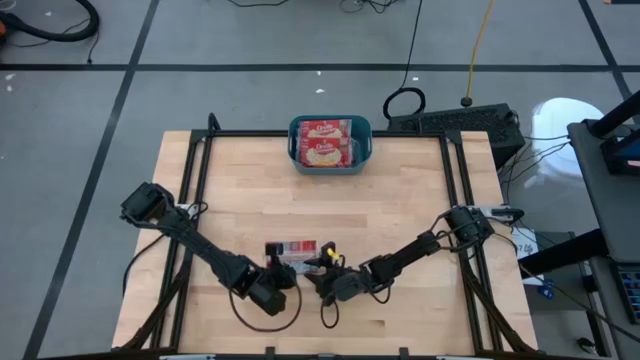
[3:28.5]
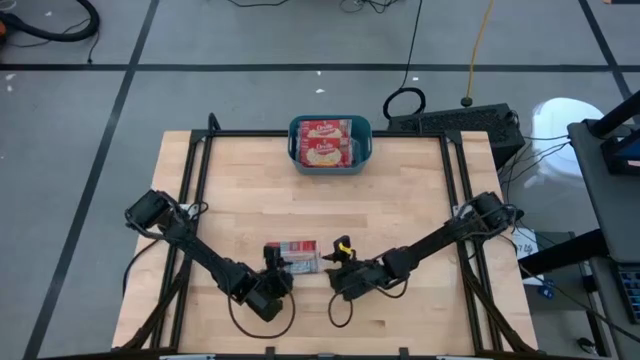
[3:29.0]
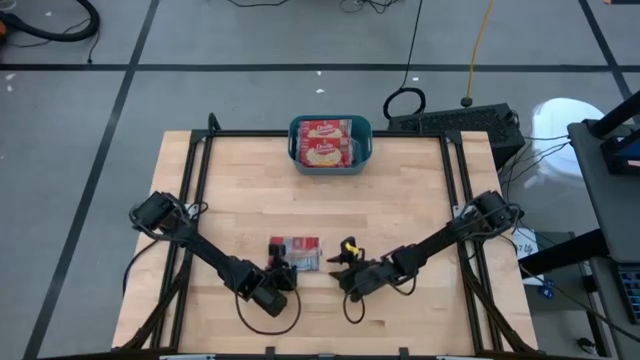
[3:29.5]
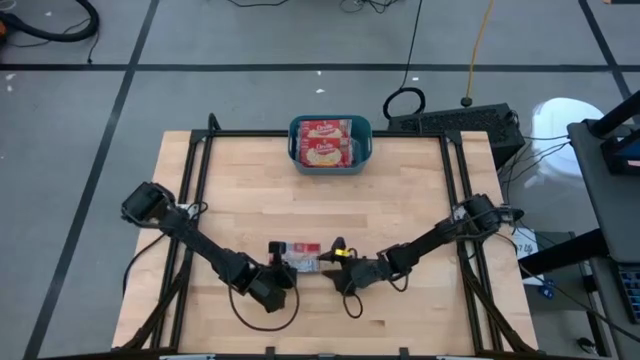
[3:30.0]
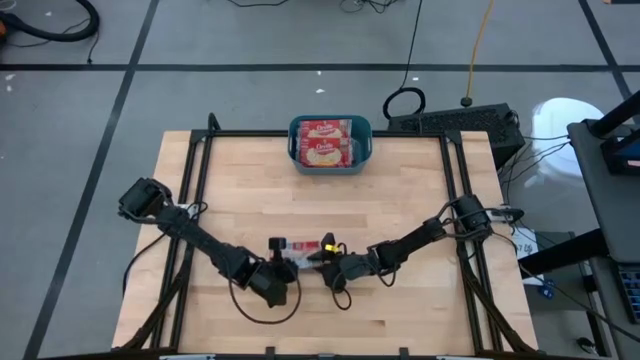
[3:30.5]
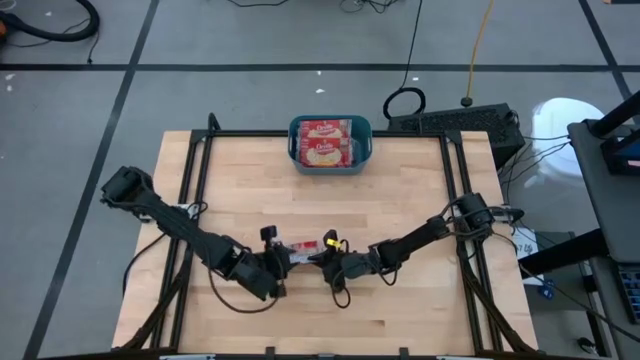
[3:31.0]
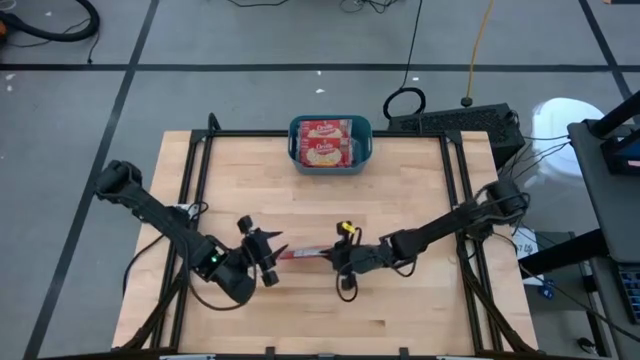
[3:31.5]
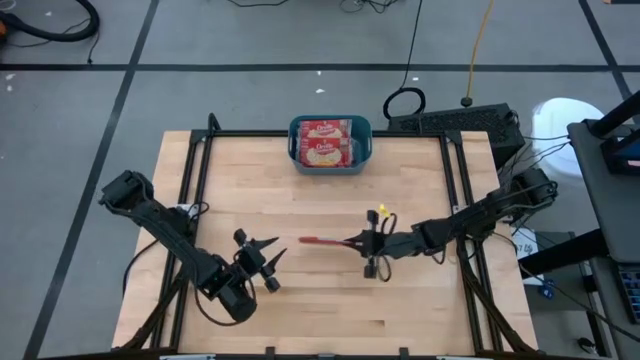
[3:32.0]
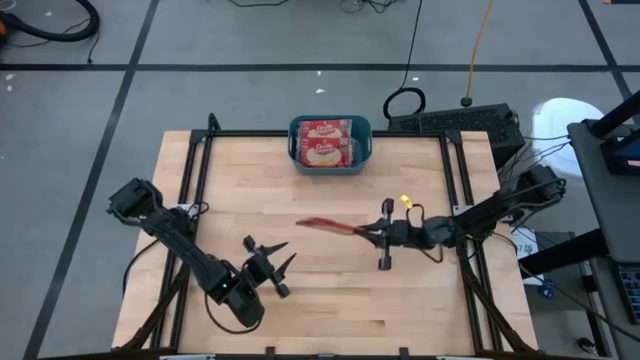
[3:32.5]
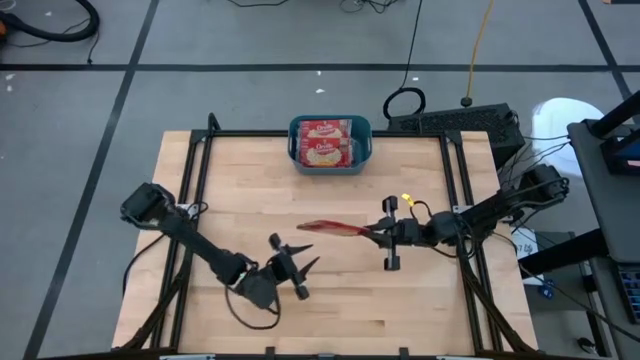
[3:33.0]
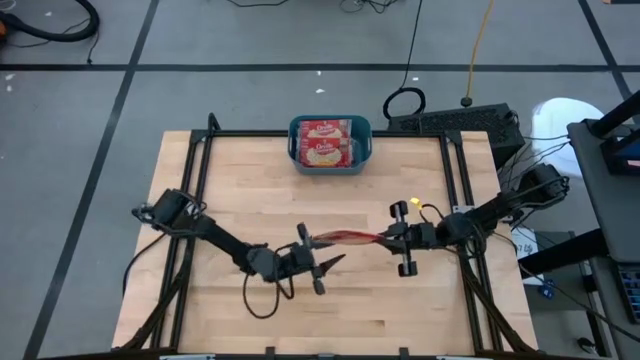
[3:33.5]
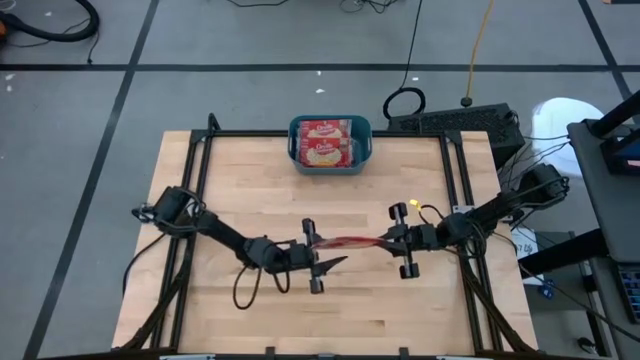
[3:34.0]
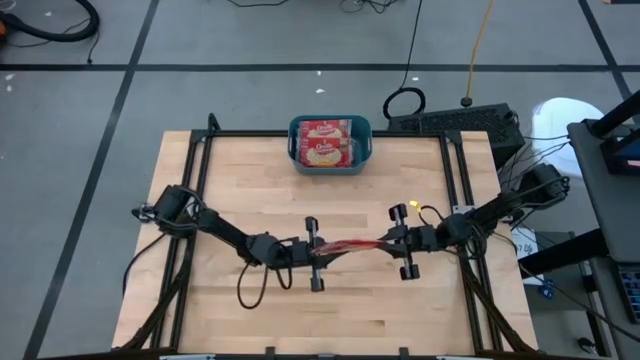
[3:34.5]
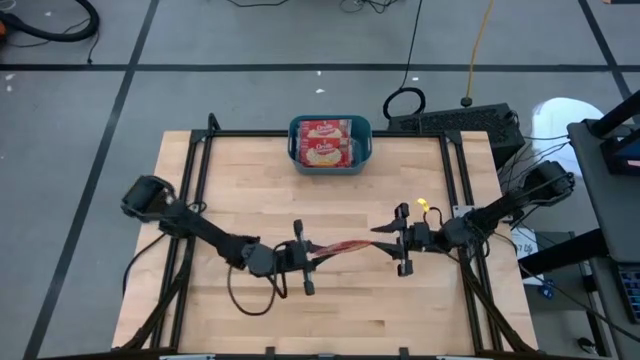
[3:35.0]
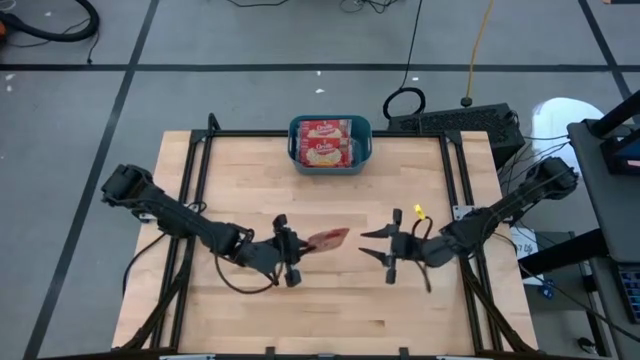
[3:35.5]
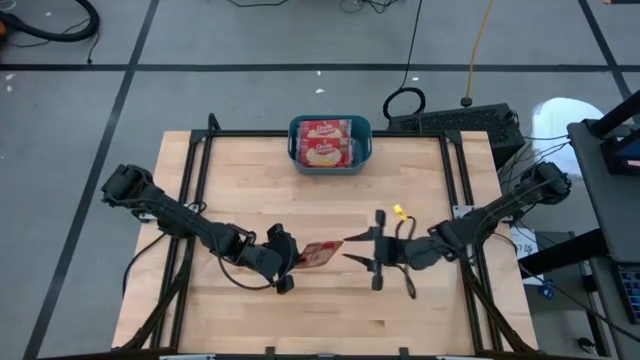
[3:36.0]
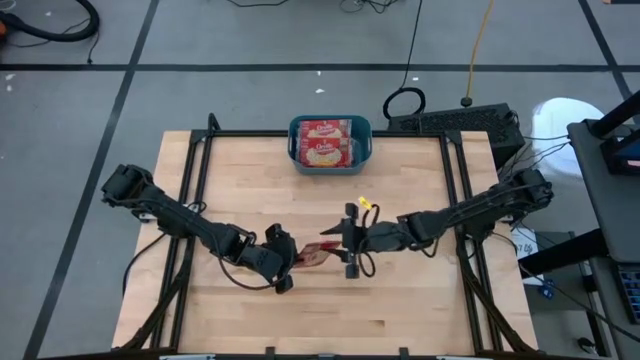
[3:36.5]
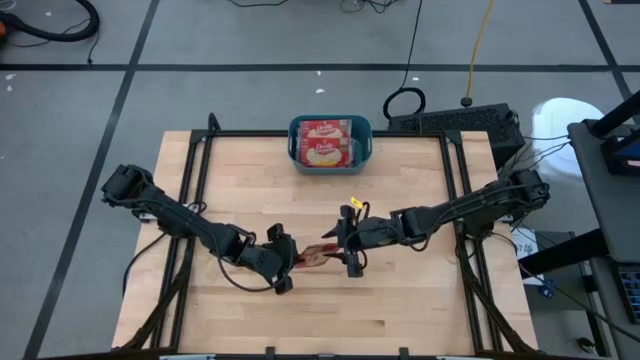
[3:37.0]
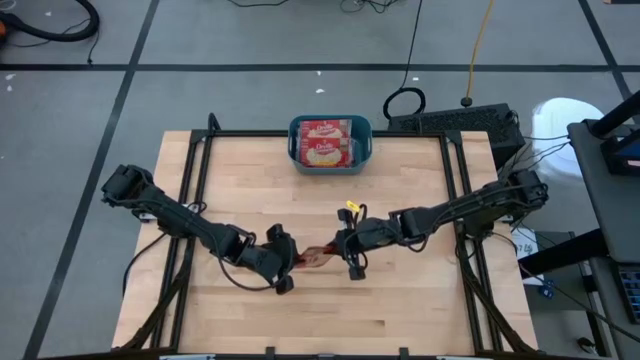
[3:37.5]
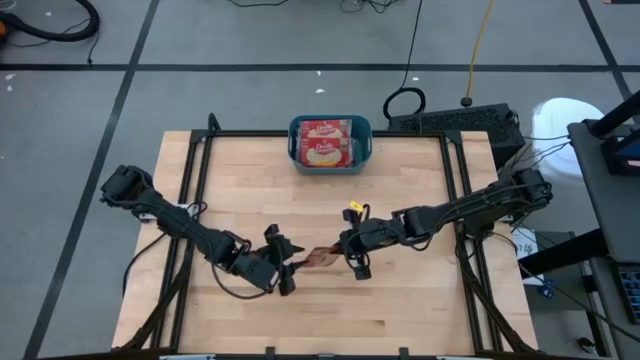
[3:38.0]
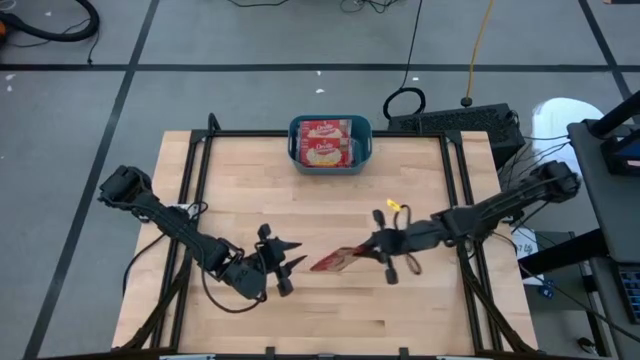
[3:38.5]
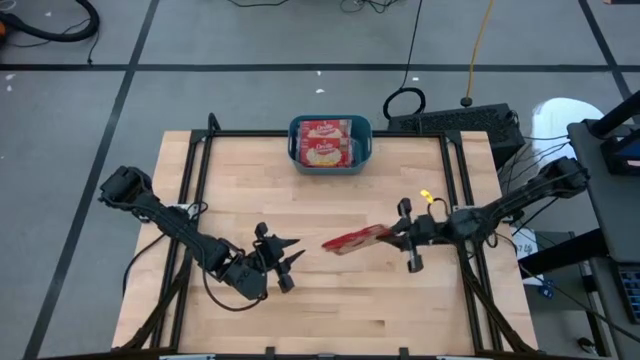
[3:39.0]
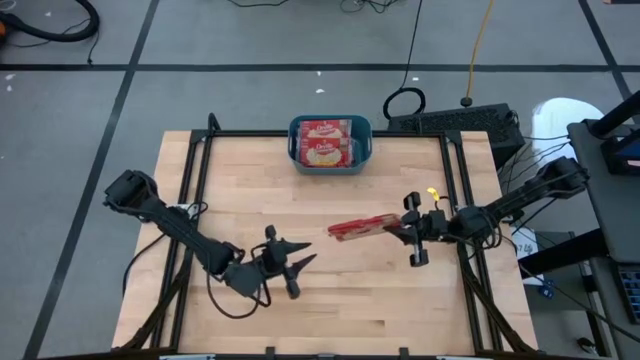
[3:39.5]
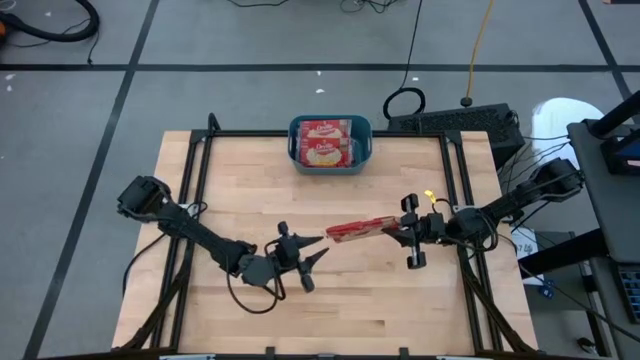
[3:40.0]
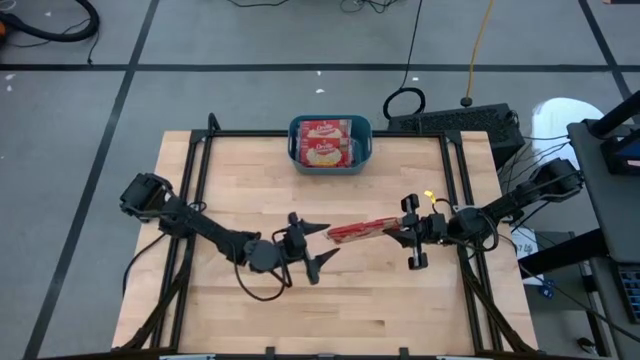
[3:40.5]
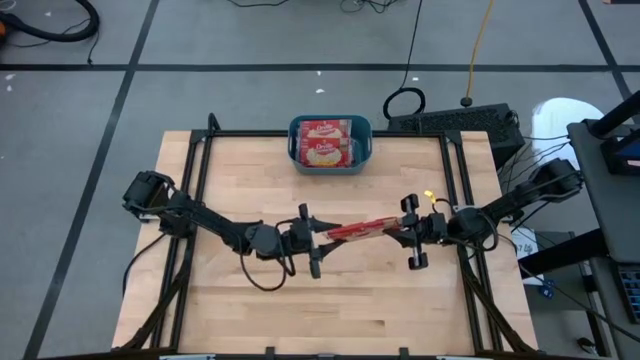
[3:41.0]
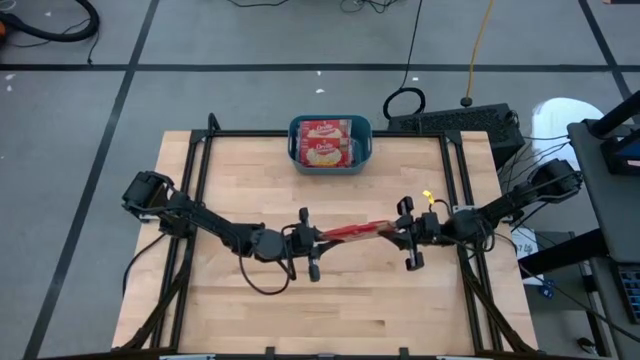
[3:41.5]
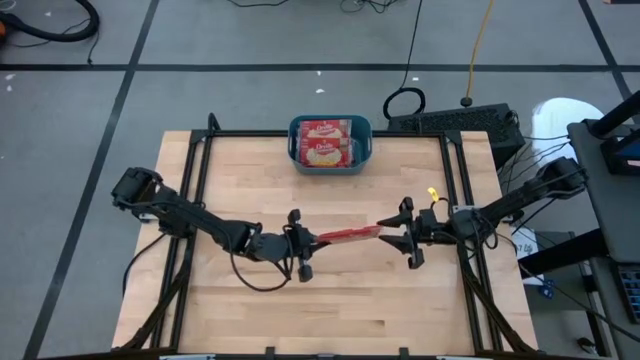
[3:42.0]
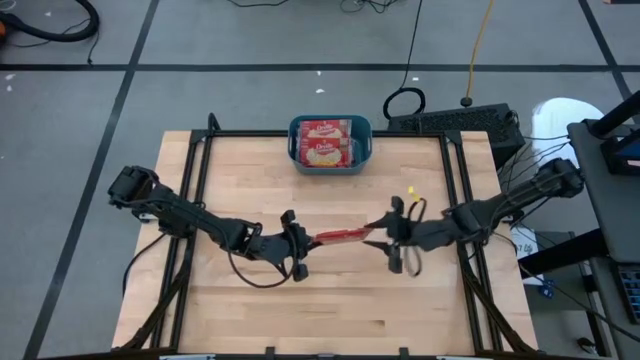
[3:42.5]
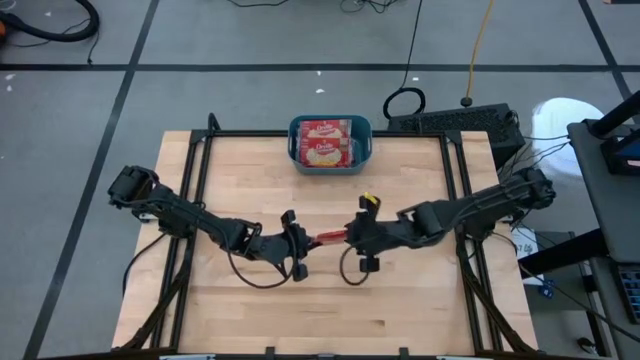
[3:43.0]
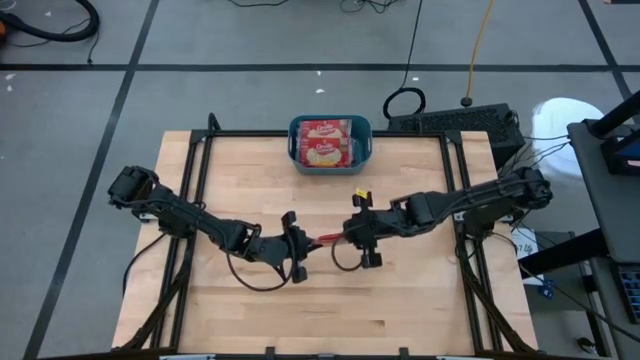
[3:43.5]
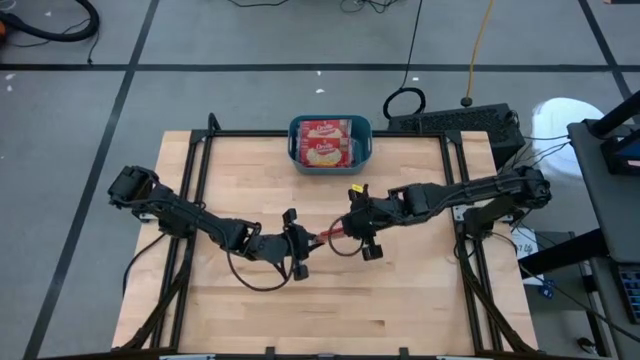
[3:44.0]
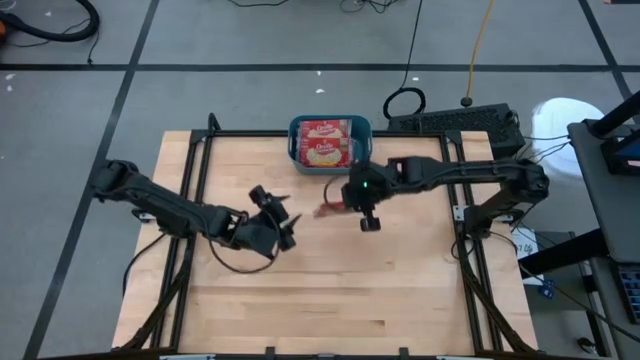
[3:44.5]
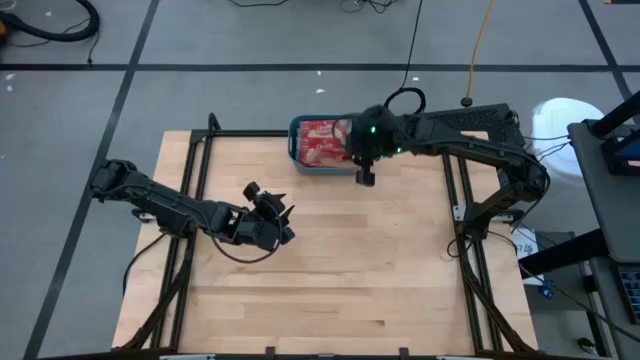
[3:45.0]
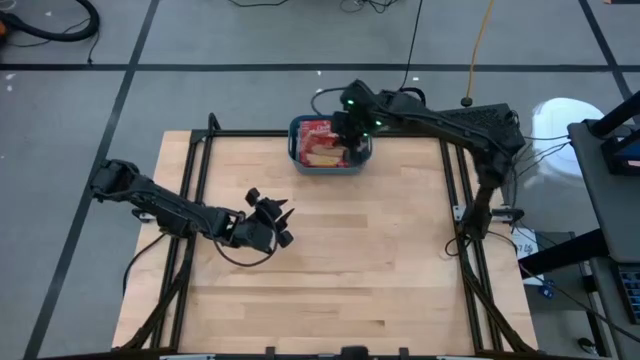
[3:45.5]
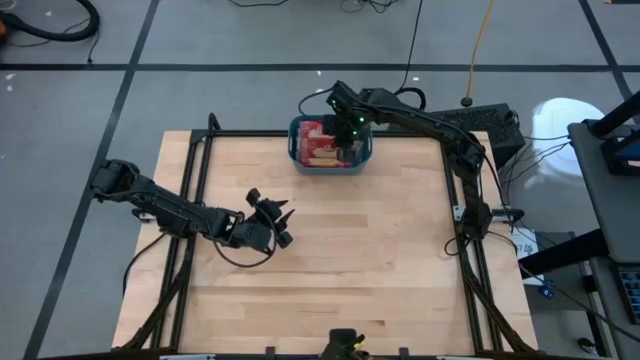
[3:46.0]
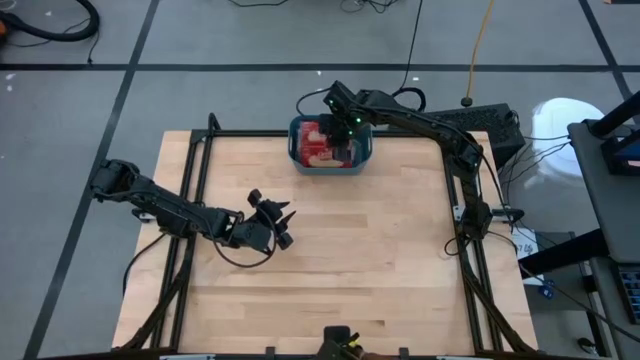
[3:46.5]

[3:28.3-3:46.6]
Task: Sort popcorn bags into baskets
Put the red popcorn bag into the blue bin
